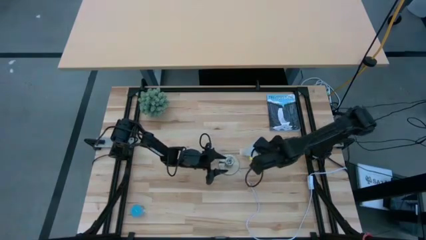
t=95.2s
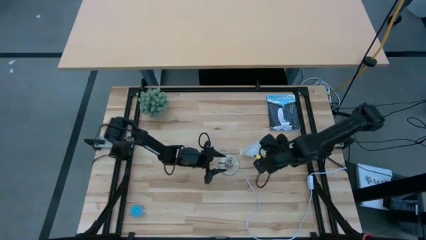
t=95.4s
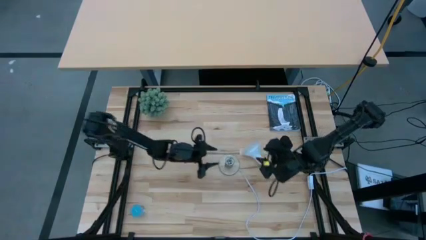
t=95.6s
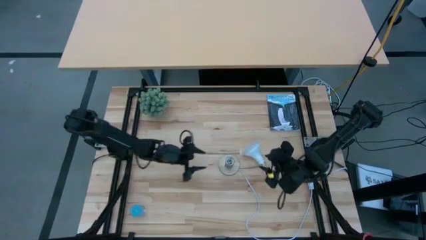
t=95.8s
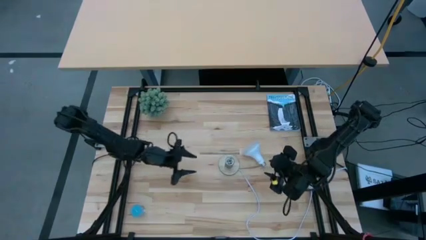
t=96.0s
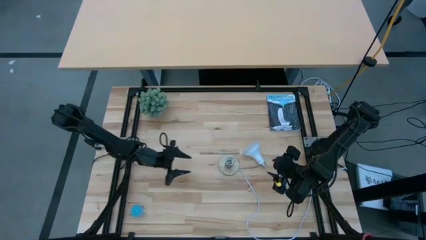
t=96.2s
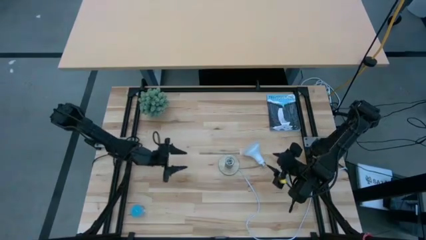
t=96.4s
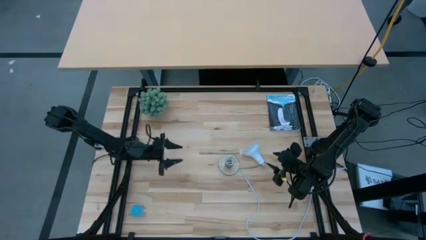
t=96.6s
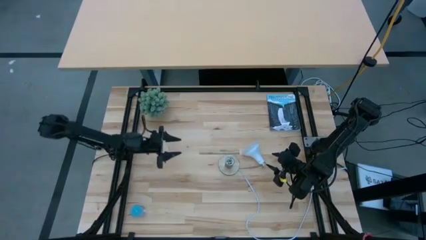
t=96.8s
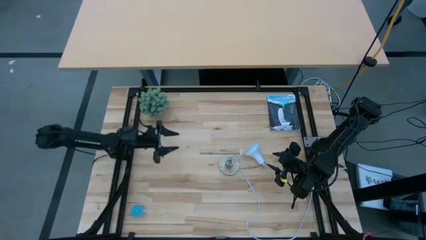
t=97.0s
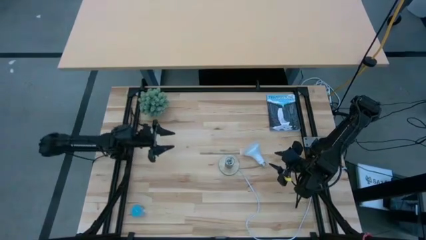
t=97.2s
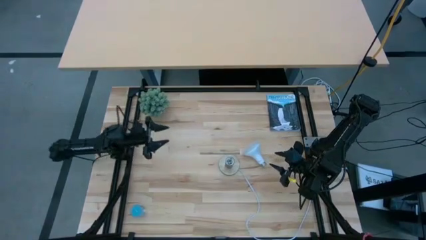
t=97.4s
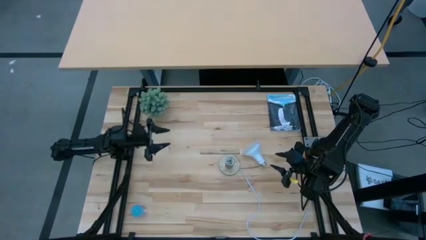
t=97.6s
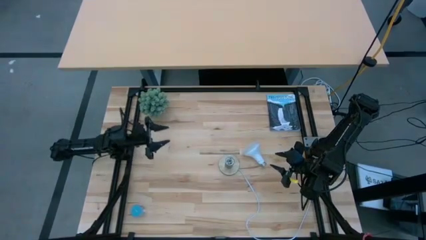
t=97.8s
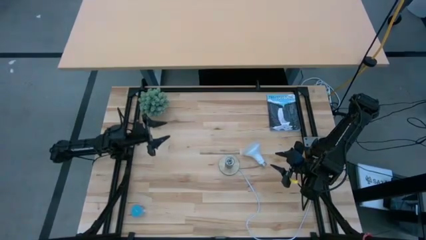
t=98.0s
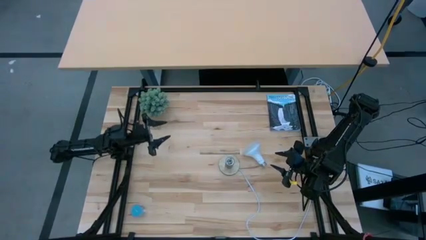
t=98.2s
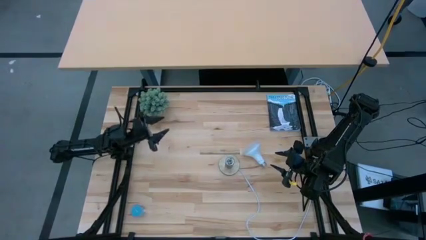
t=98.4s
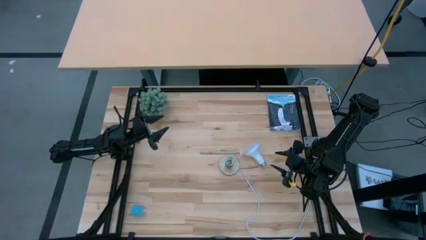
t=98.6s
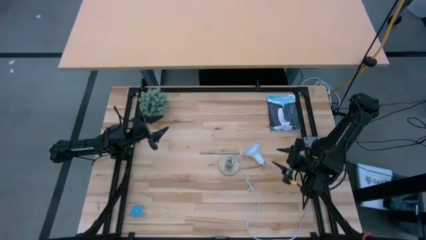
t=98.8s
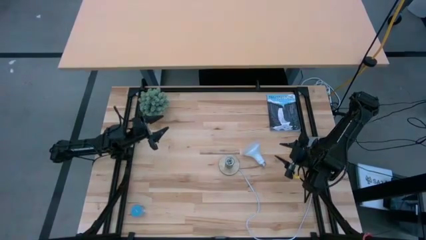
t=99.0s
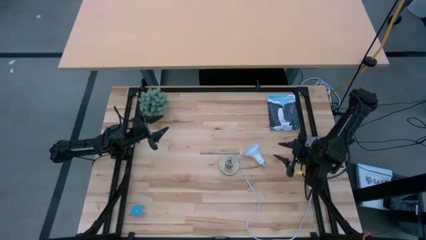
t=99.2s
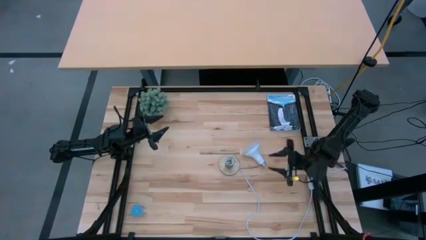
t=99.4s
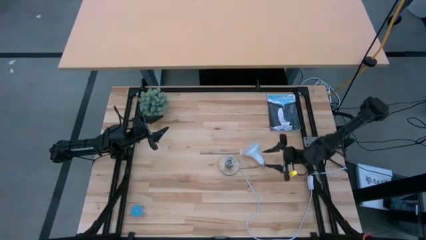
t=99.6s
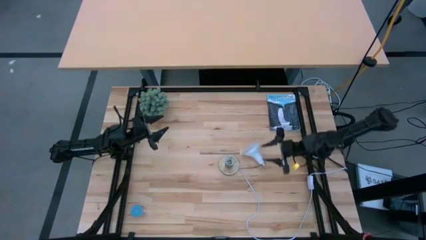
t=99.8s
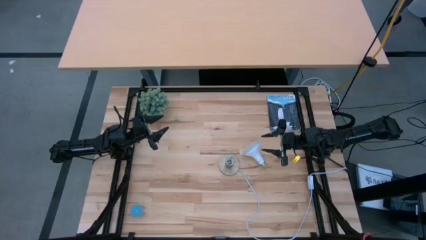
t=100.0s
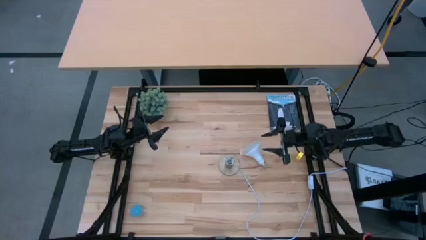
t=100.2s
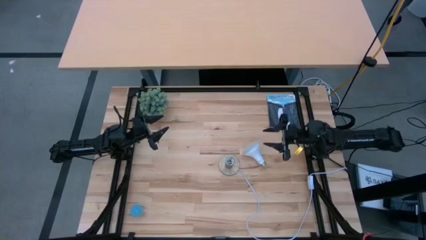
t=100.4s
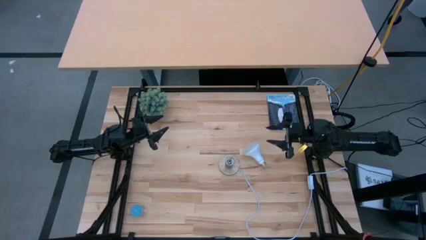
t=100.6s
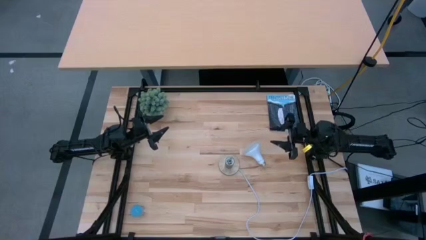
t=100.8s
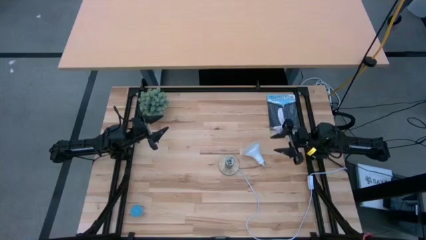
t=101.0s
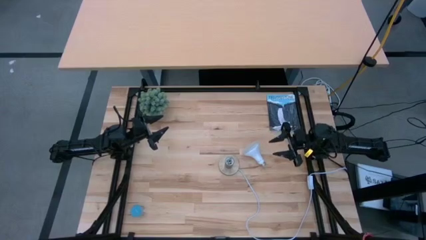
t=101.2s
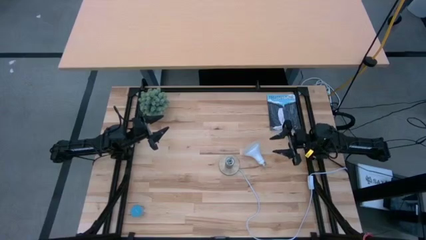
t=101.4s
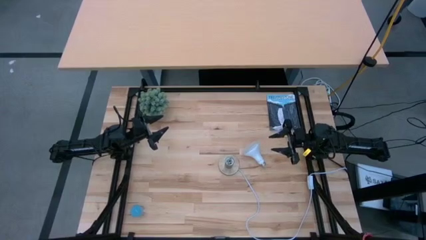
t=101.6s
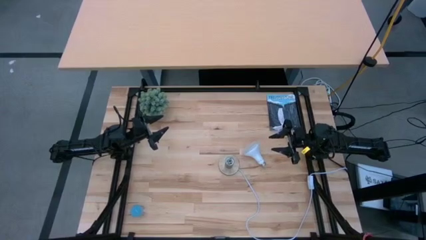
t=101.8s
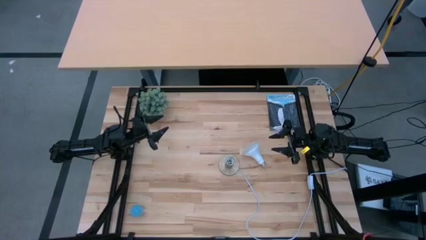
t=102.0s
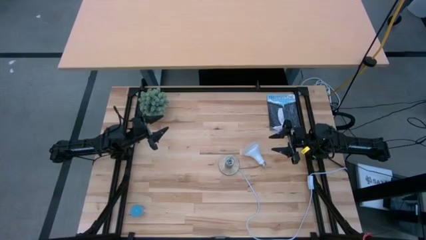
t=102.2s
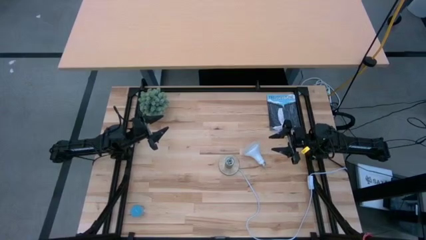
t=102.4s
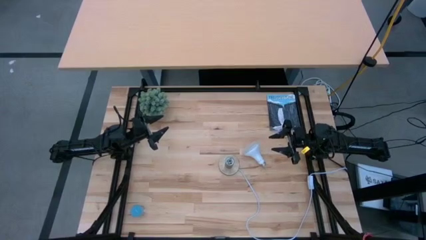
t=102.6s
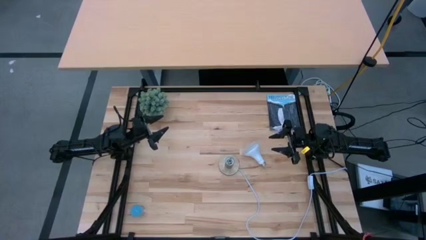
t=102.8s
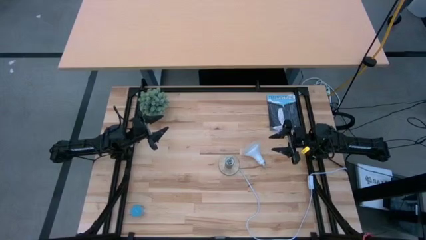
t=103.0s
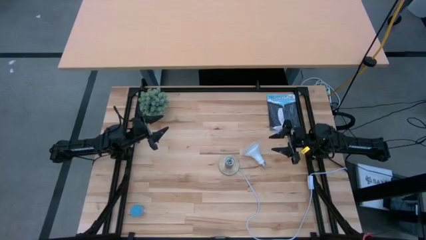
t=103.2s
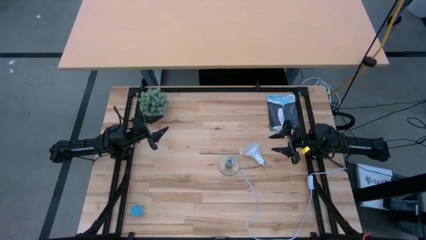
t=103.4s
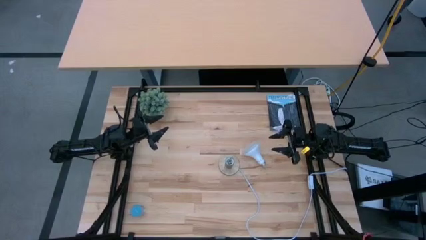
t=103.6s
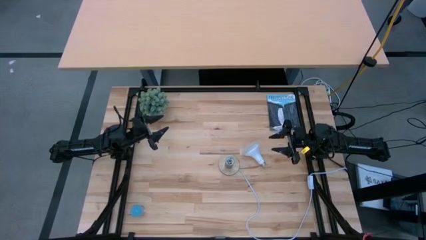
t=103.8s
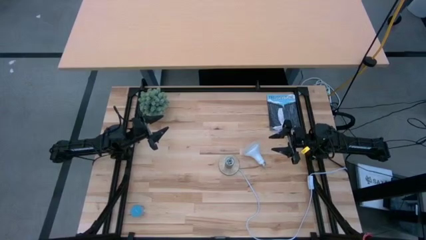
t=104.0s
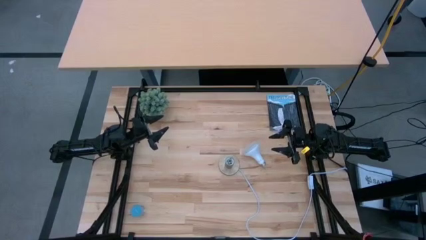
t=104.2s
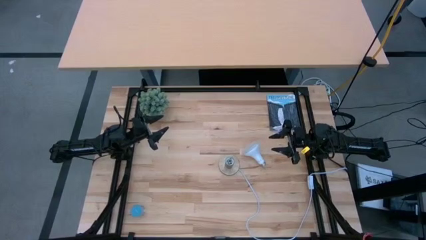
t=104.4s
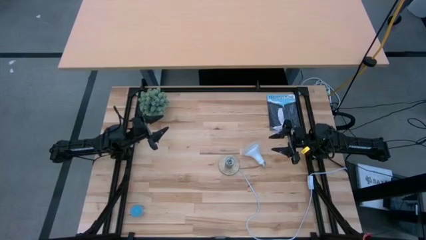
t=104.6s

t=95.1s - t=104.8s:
Task: Screw lightbulb
Return to Home Position

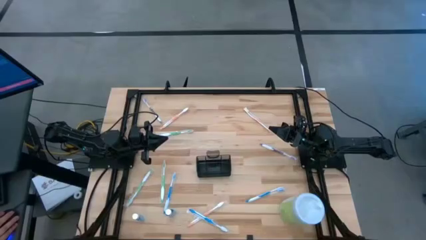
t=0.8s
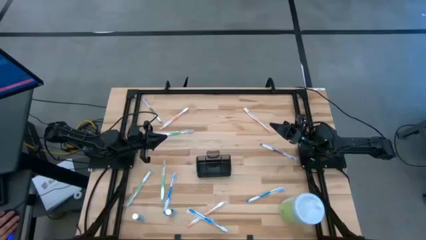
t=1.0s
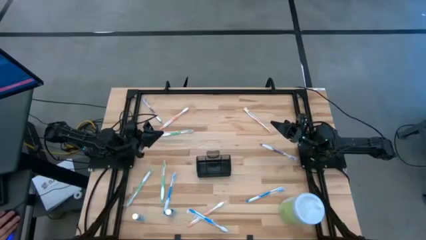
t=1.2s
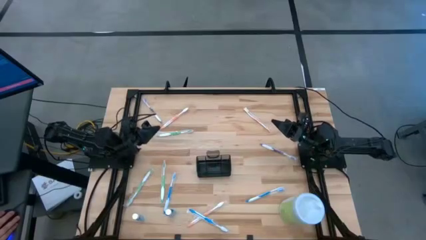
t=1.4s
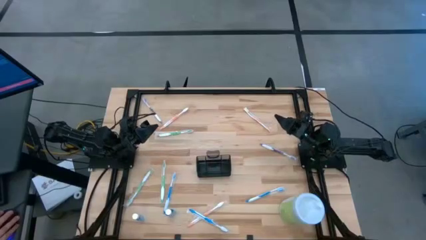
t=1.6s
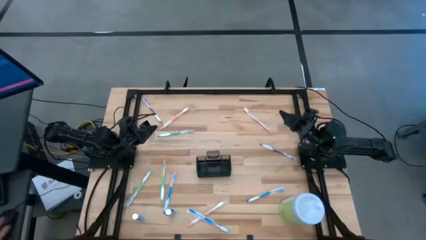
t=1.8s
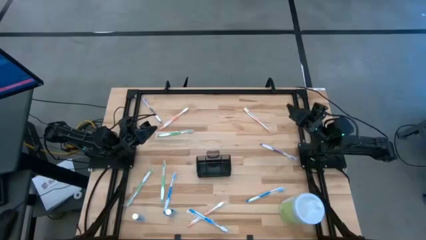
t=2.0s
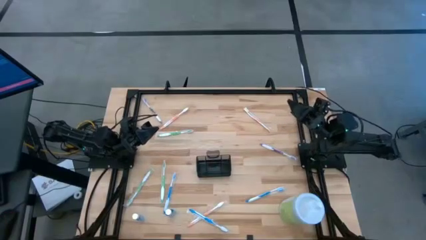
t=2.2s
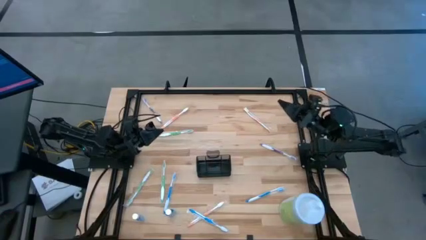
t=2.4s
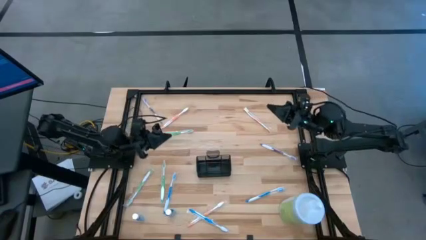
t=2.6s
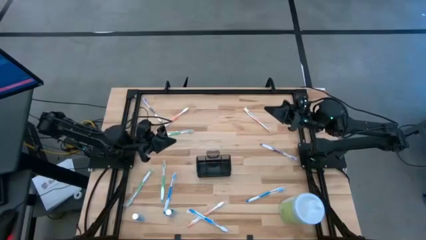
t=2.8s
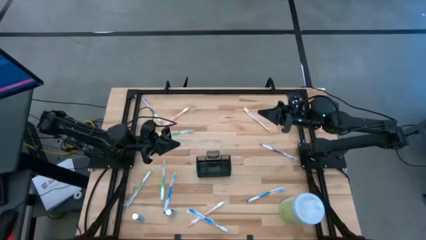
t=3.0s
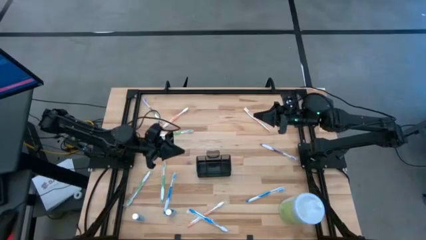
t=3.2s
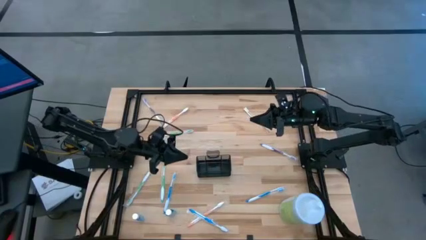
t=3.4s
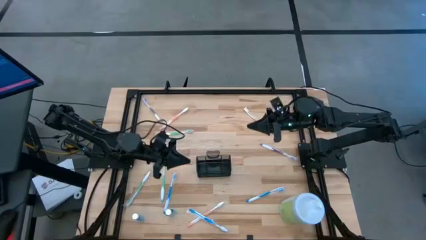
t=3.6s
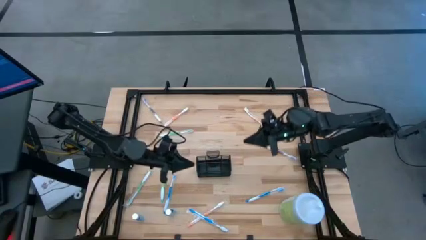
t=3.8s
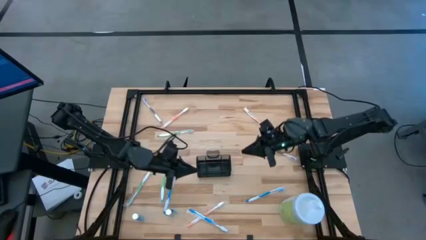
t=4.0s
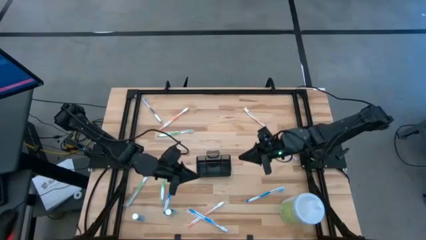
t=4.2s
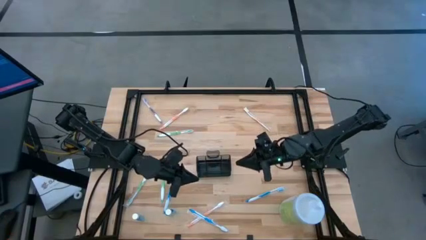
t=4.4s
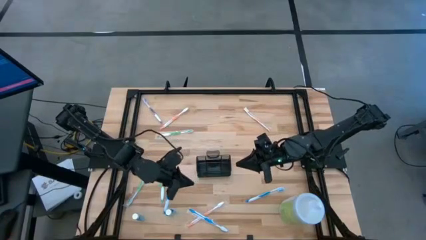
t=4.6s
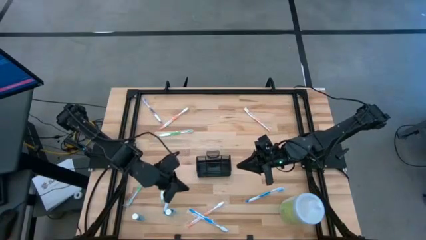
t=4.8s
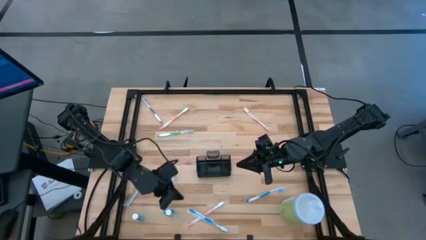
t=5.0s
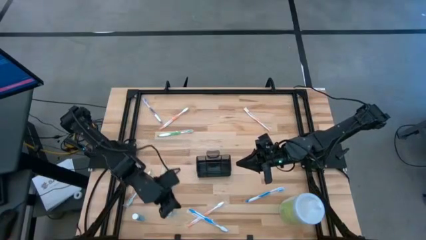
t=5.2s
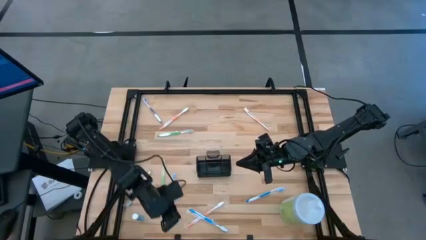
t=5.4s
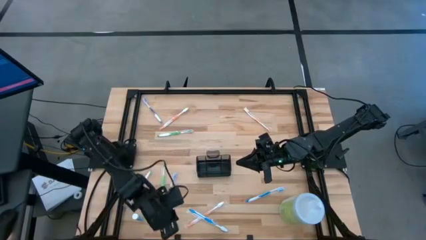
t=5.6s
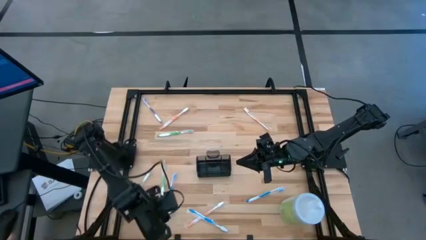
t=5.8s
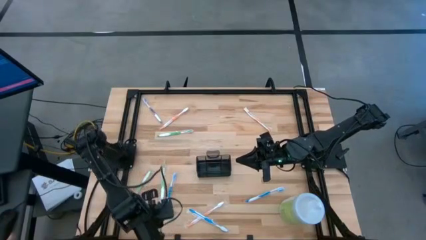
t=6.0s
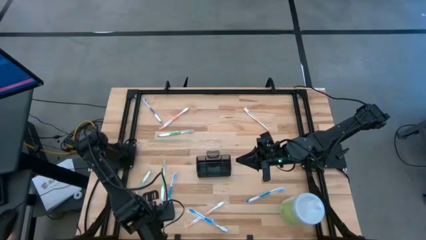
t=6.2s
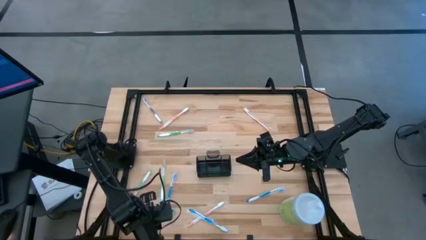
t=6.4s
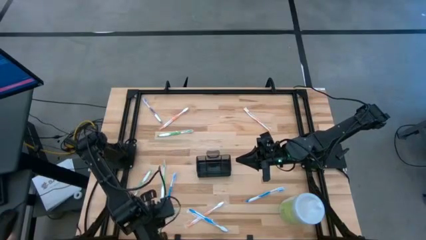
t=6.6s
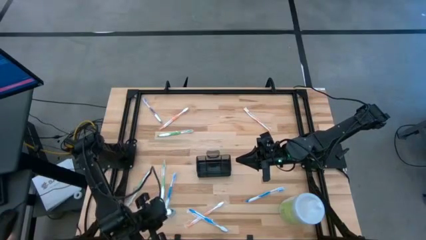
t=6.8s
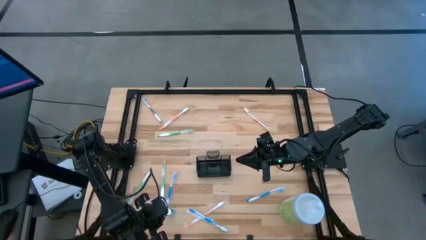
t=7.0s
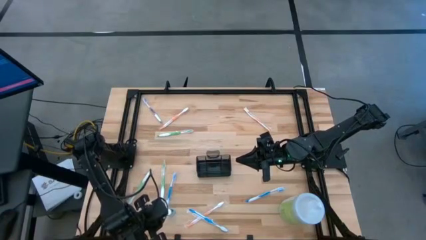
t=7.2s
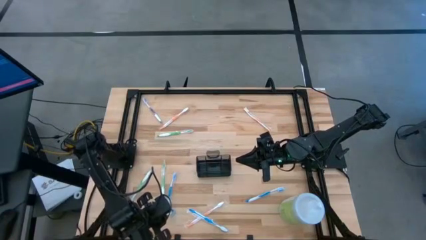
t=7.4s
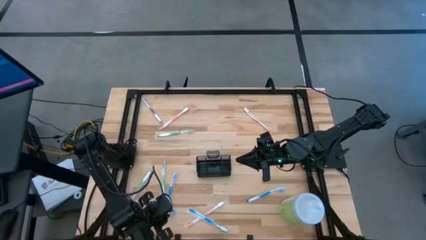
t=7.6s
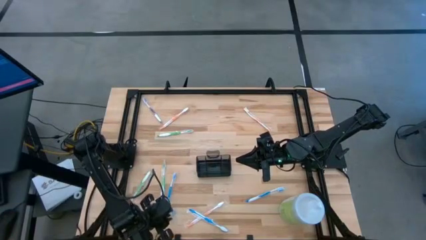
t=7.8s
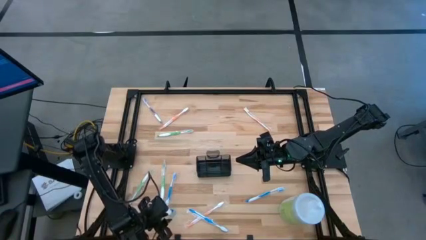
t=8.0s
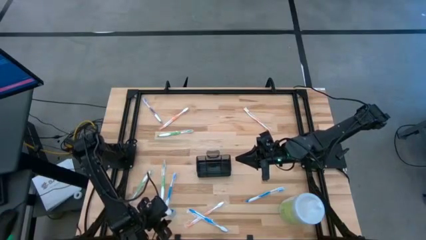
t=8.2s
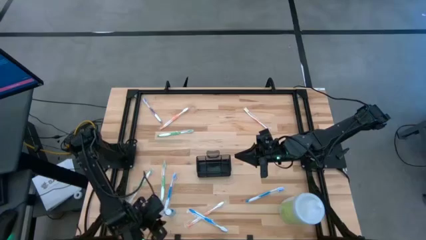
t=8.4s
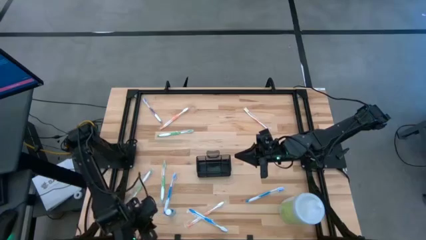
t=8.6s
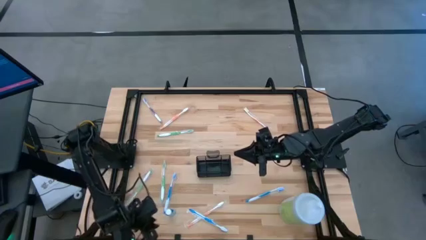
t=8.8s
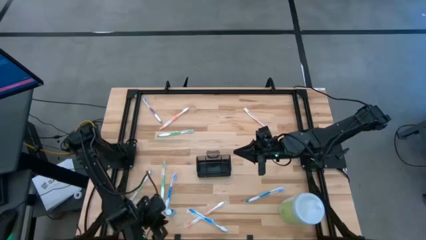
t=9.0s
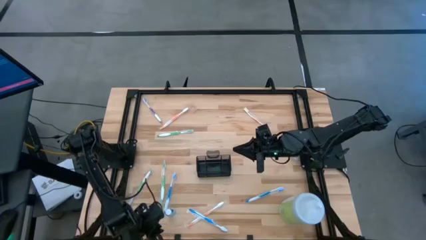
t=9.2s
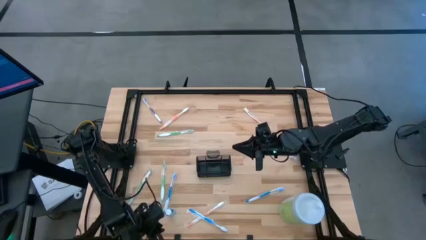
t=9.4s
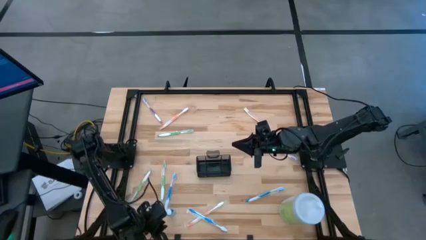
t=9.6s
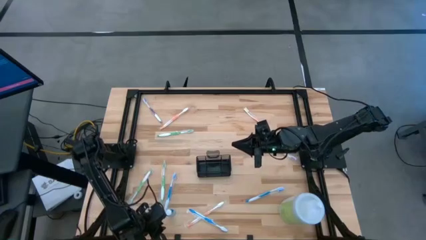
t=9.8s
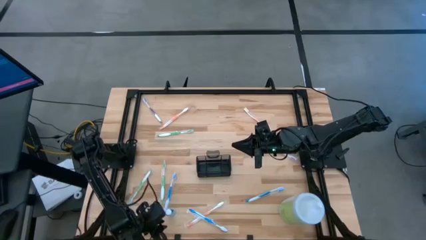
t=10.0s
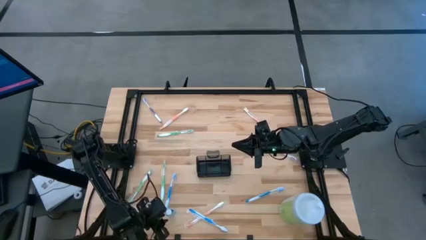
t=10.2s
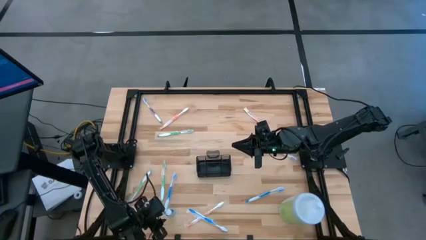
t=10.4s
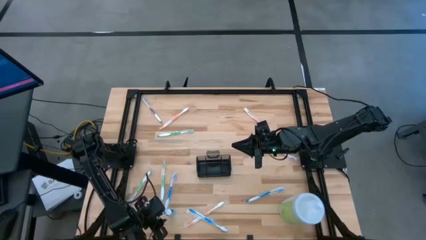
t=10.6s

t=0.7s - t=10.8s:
Task: Pick & Place toothbrushing station
Put the right mouthwash into the middle section of the mesh organizer
